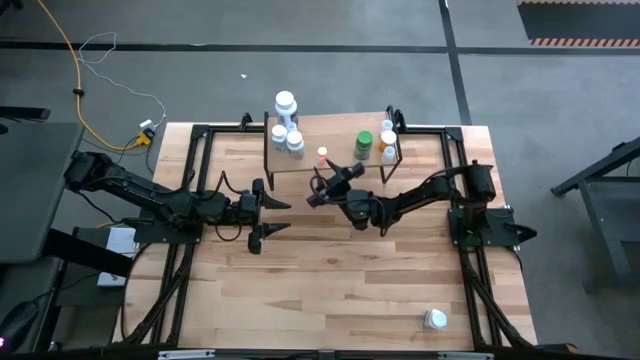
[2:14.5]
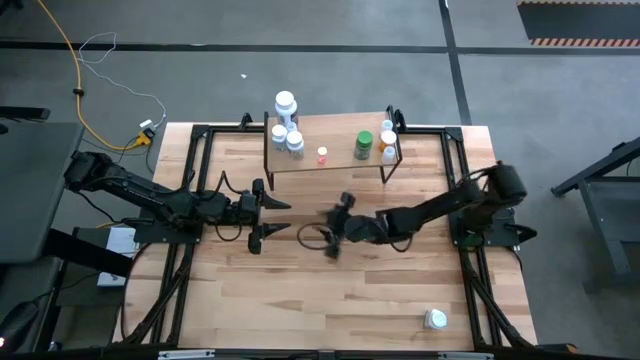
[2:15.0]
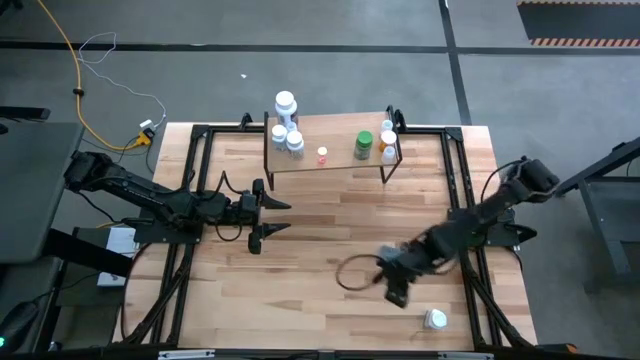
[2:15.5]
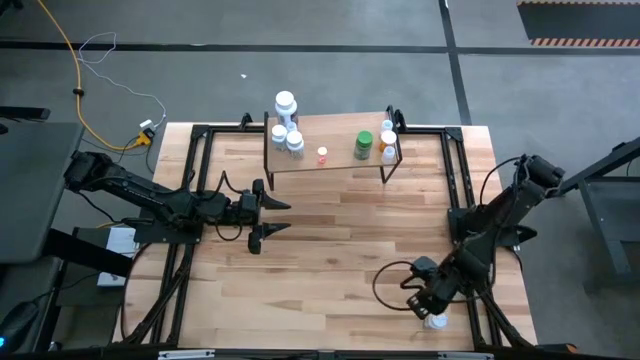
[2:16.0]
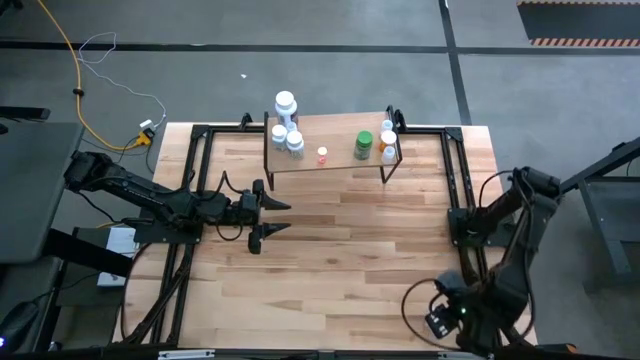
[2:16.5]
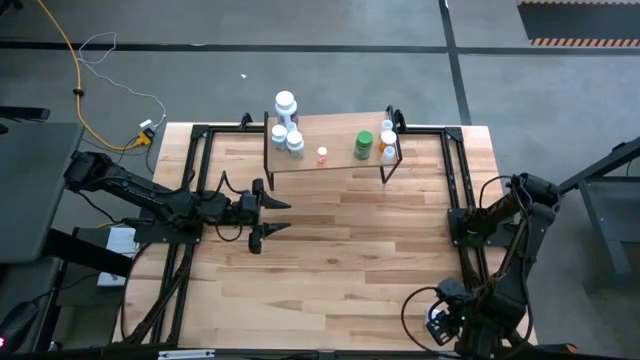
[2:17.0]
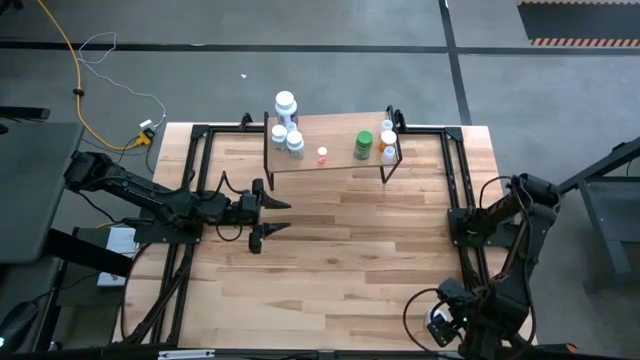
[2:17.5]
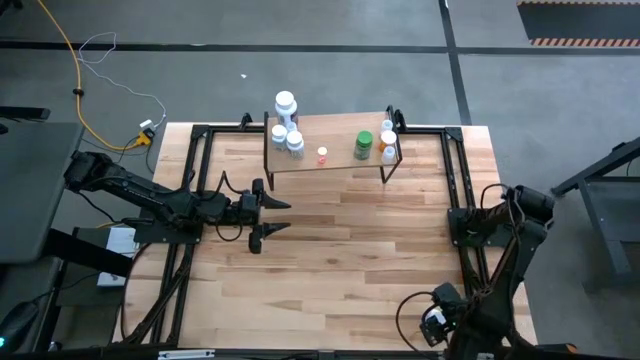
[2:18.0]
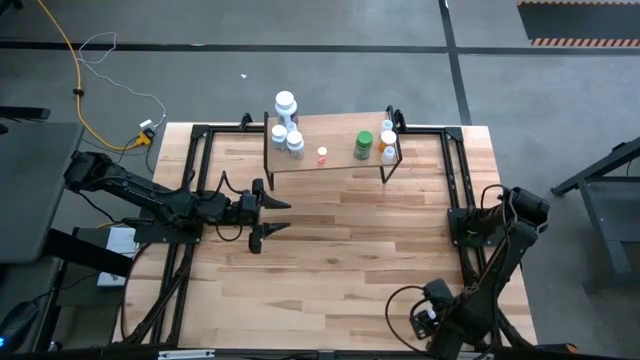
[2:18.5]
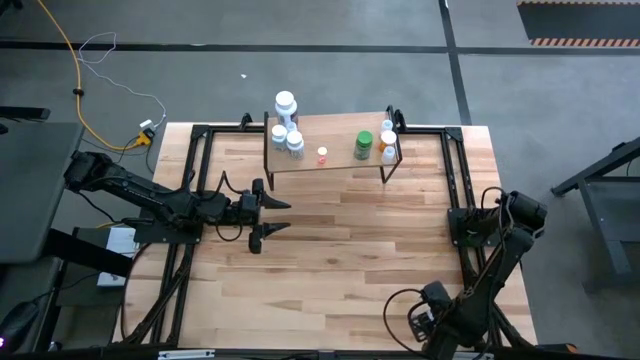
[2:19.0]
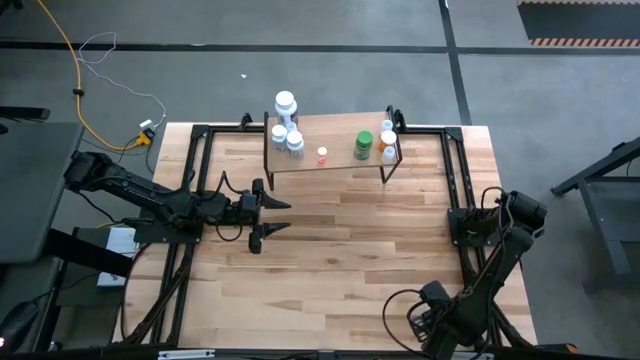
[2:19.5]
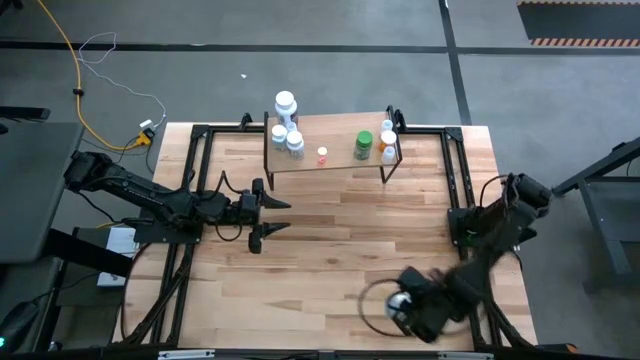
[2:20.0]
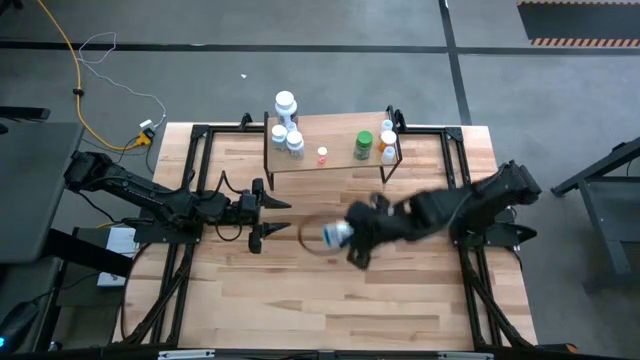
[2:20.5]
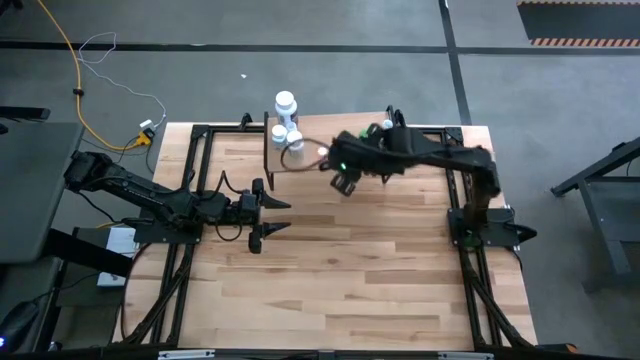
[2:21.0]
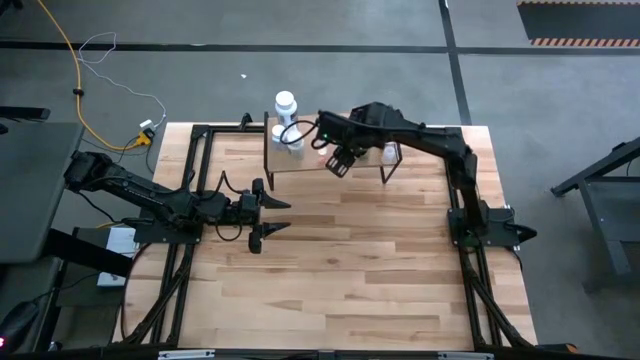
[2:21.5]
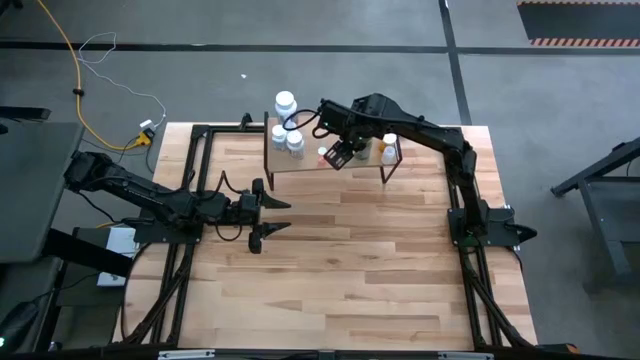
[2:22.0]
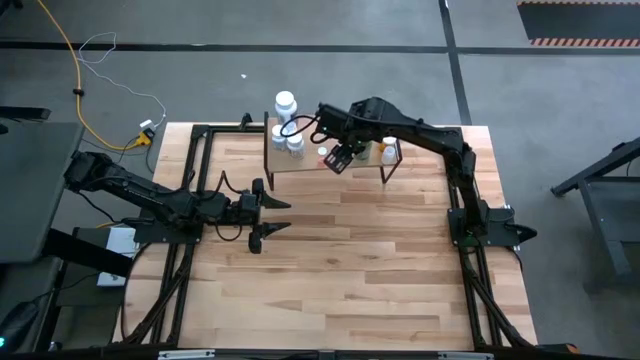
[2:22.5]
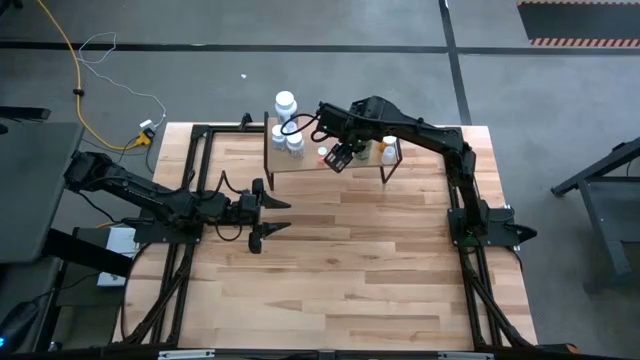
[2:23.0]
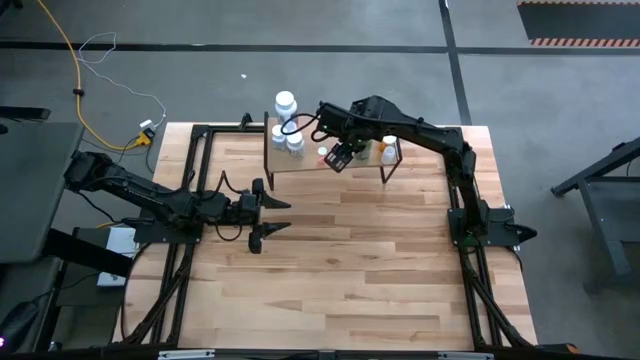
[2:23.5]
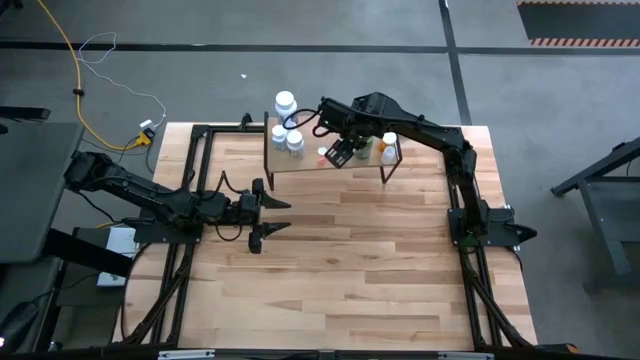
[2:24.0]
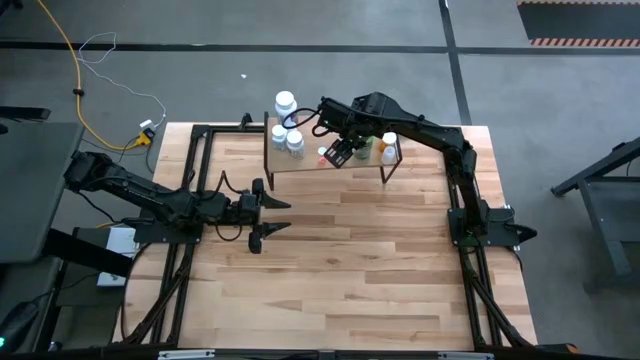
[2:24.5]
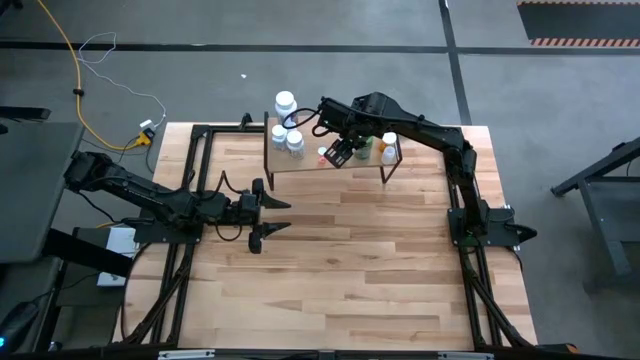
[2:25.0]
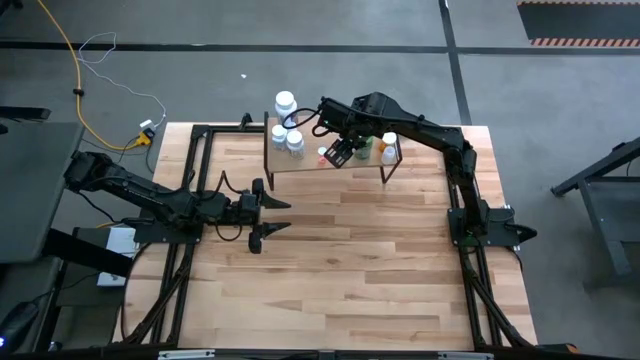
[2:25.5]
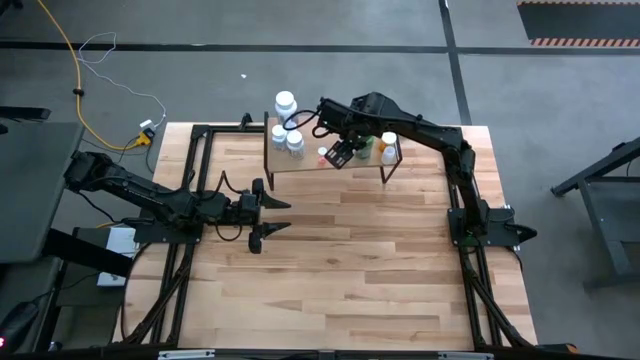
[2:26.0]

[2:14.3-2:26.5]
Task: Pick and place medicine bottles onto shelf by color
Put the white blue pill bottle on the shelf

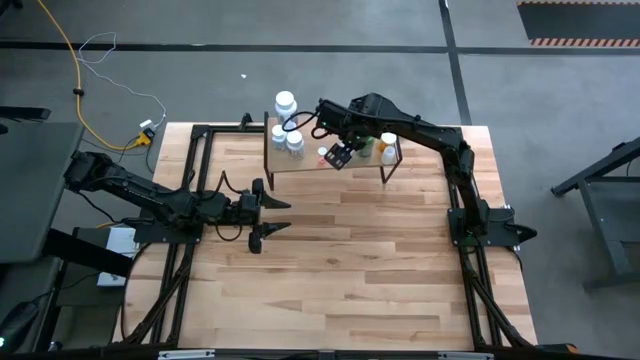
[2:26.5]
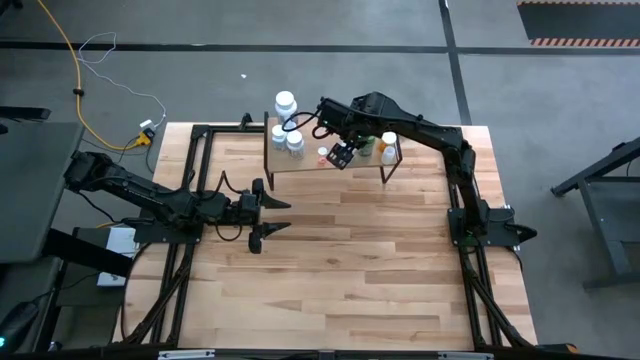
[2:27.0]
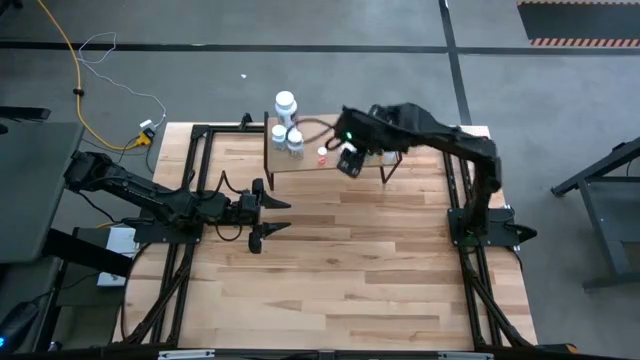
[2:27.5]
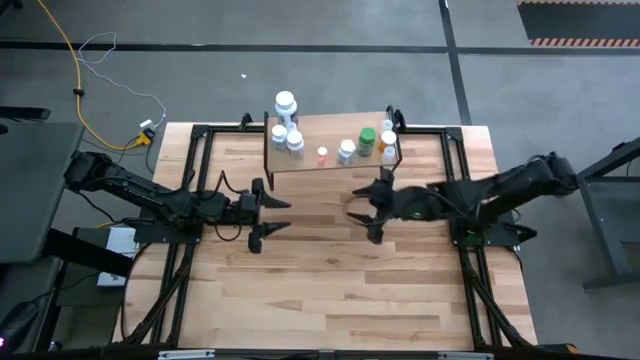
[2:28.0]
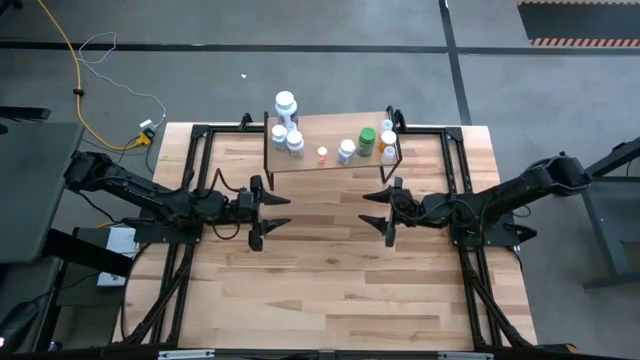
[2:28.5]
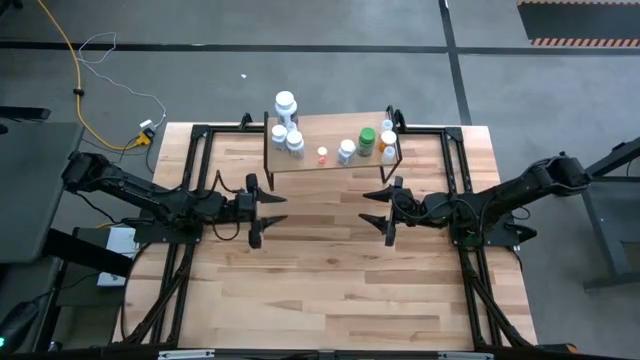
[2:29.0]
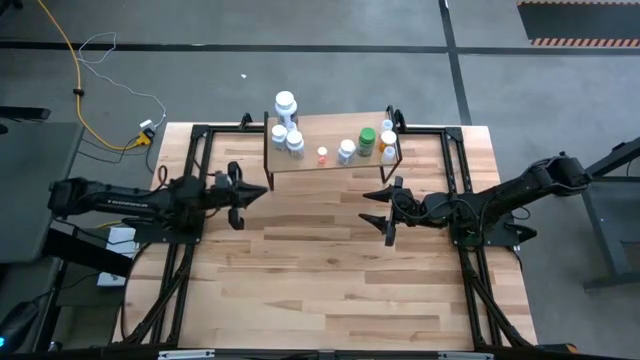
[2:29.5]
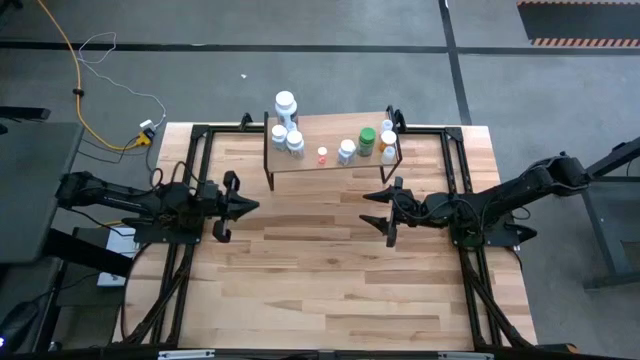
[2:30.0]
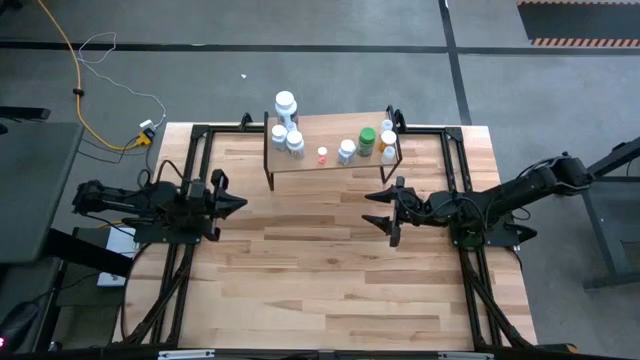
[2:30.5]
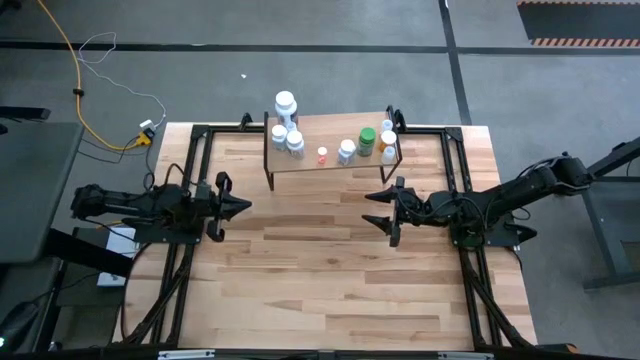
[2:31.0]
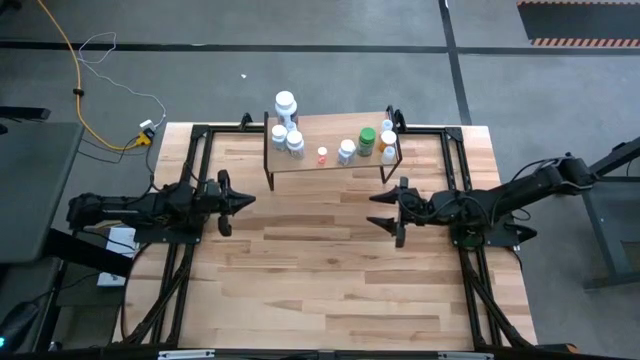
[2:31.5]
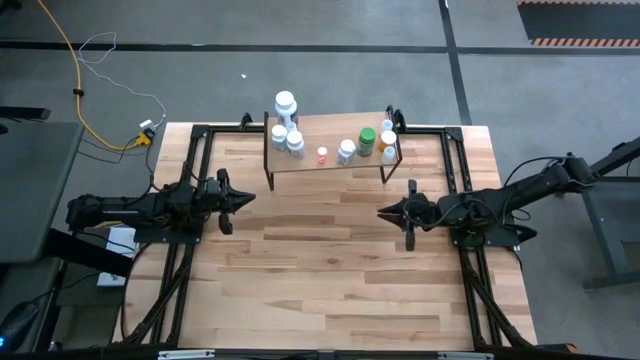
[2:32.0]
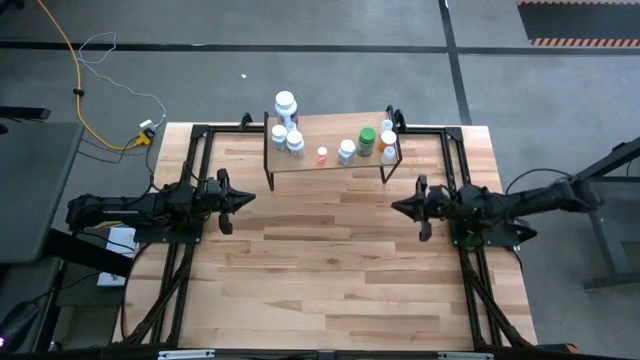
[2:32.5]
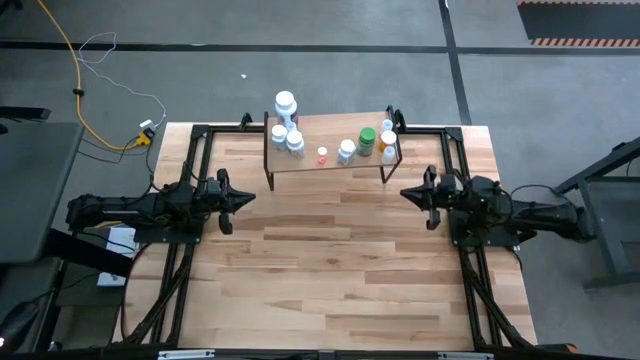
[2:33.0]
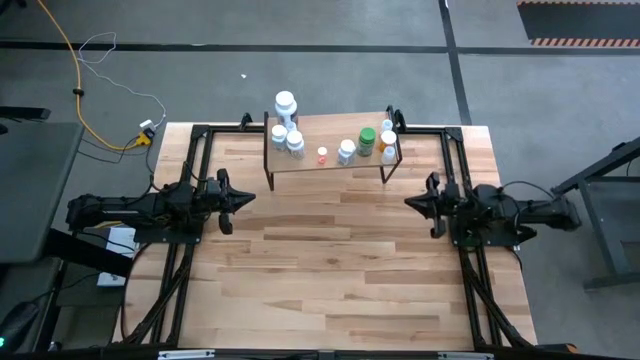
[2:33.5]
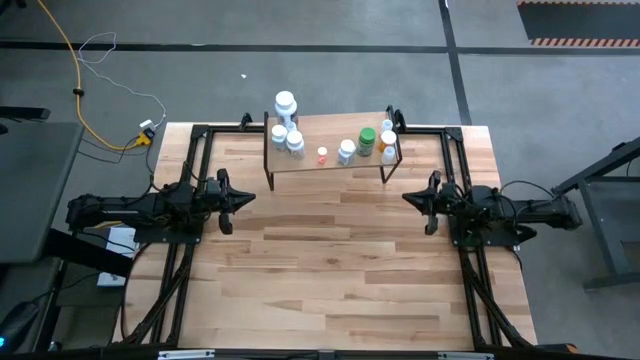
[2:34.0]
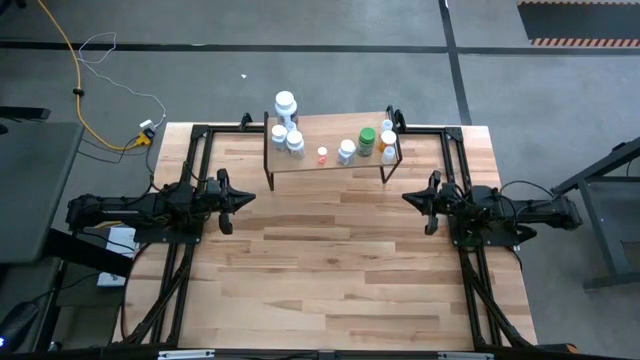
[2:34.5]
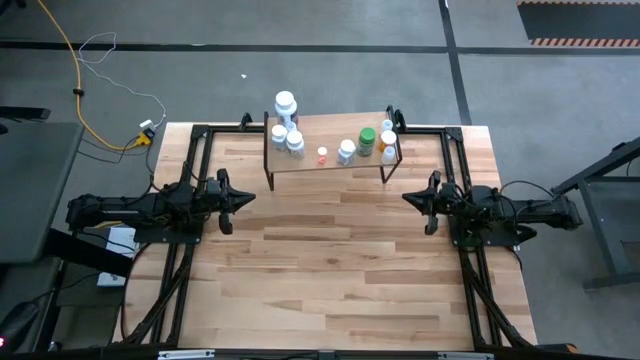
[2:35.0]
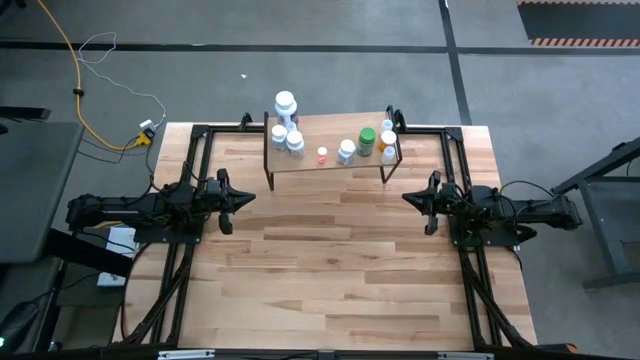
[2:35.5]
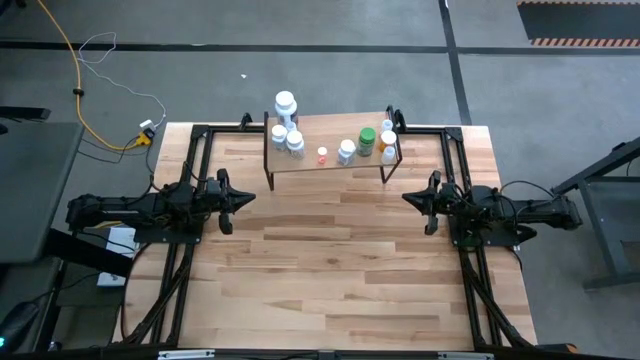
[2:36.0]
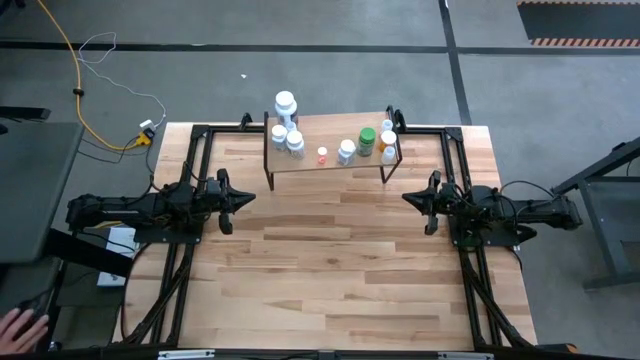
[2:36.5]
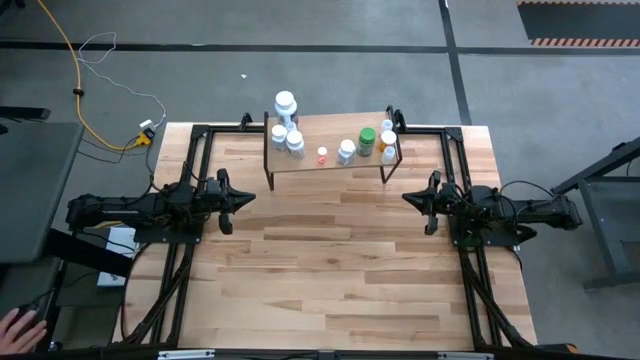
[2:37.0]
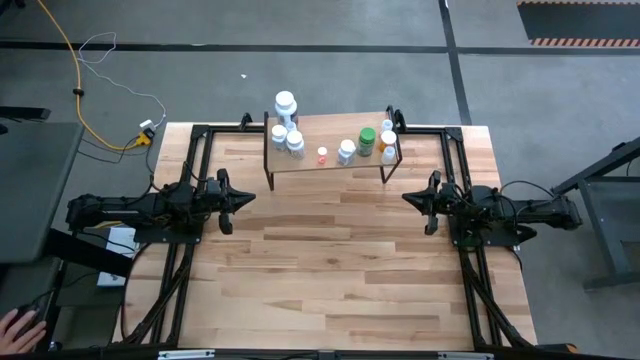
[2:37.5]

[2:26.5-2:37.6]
Return to Home Position
